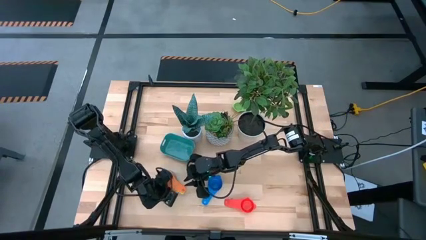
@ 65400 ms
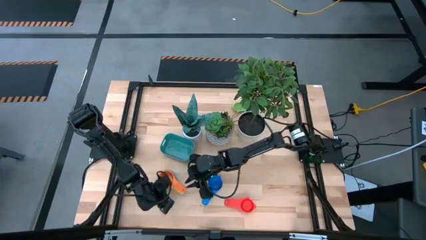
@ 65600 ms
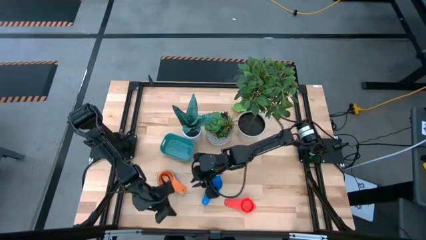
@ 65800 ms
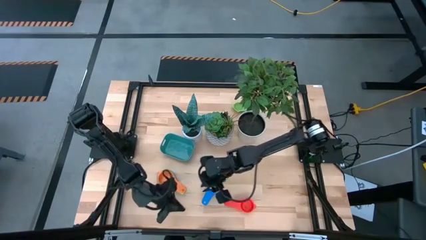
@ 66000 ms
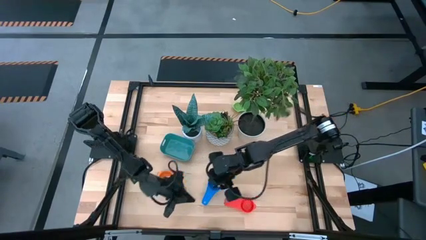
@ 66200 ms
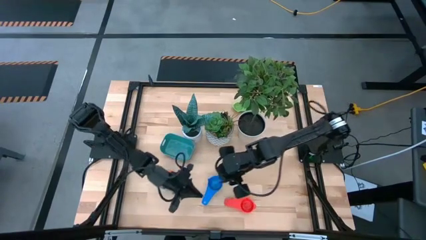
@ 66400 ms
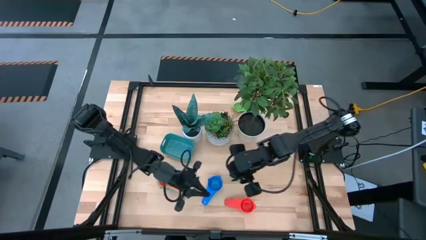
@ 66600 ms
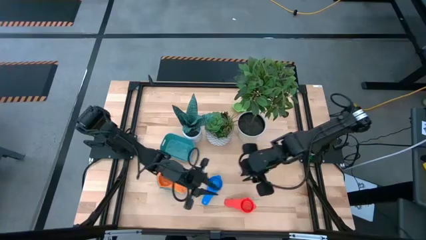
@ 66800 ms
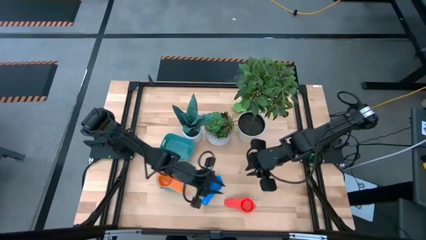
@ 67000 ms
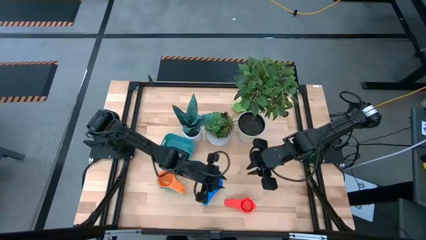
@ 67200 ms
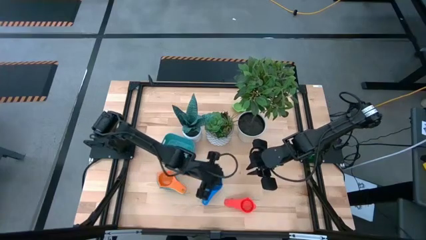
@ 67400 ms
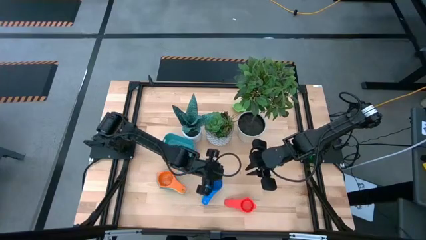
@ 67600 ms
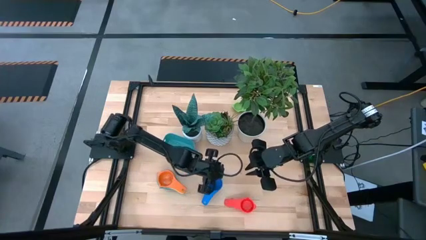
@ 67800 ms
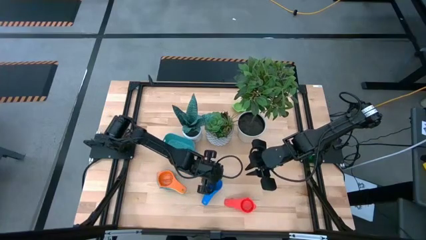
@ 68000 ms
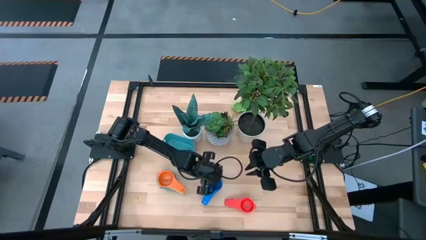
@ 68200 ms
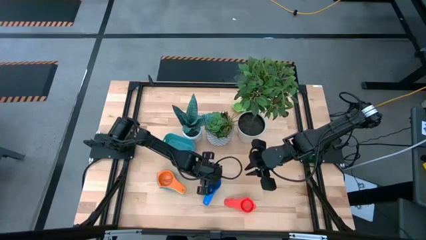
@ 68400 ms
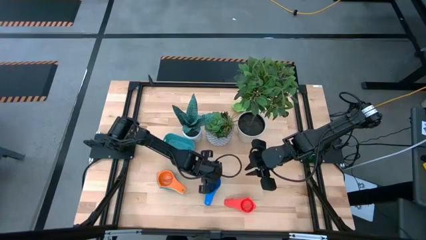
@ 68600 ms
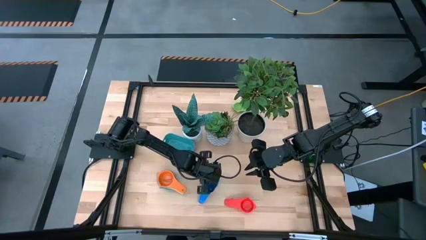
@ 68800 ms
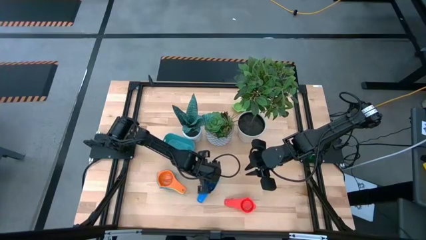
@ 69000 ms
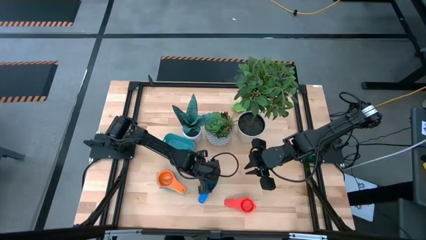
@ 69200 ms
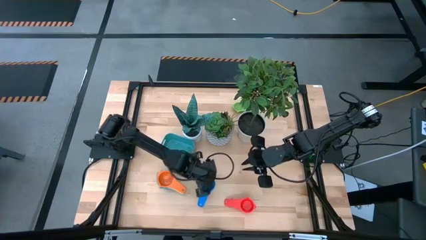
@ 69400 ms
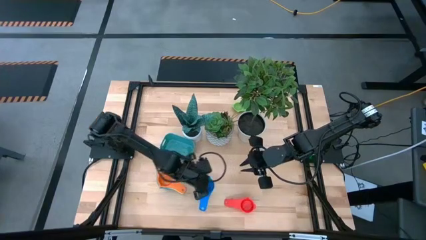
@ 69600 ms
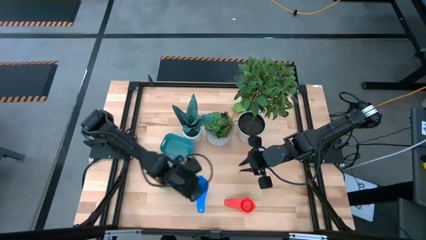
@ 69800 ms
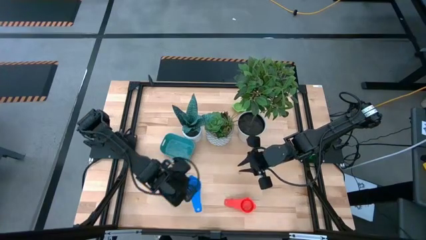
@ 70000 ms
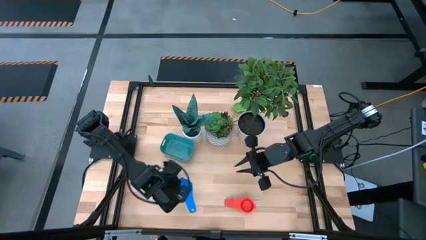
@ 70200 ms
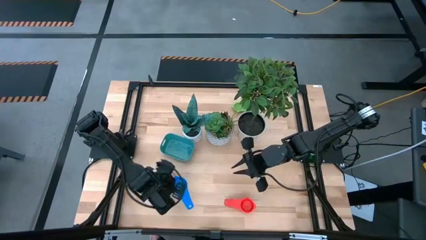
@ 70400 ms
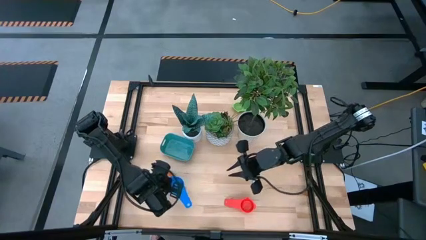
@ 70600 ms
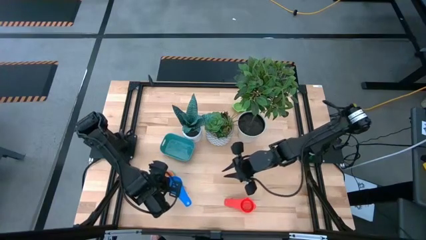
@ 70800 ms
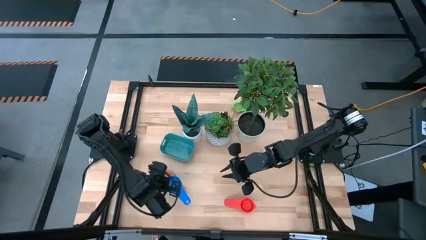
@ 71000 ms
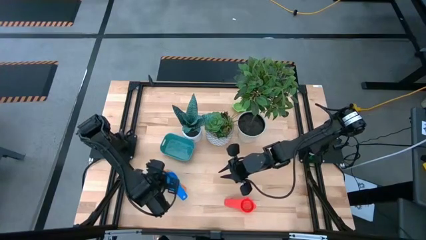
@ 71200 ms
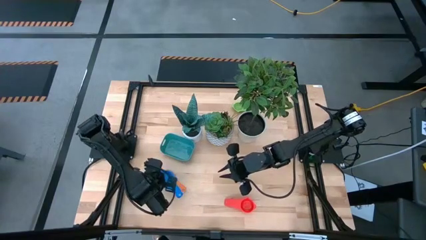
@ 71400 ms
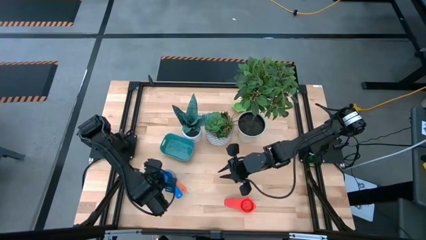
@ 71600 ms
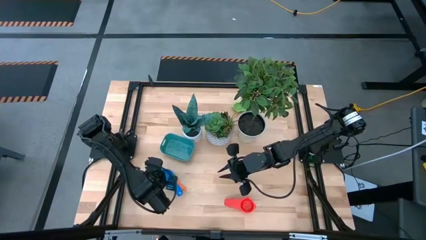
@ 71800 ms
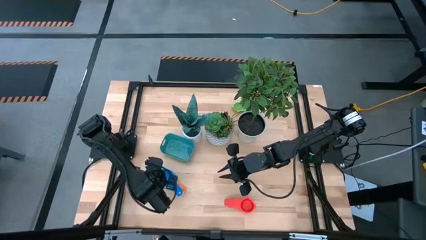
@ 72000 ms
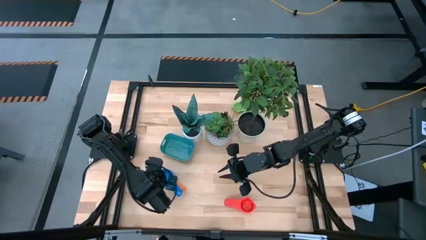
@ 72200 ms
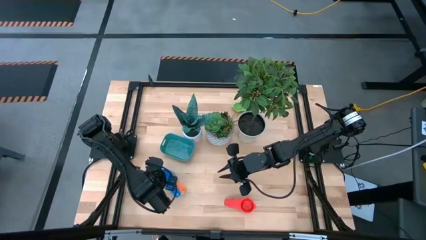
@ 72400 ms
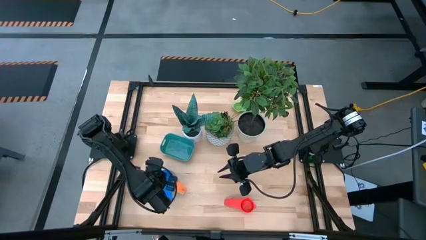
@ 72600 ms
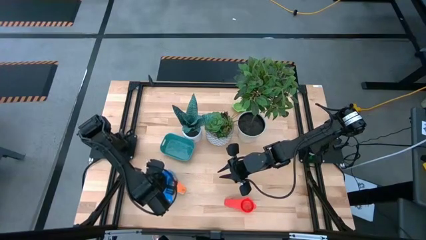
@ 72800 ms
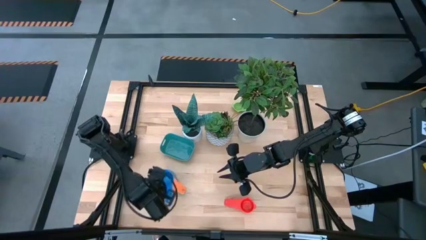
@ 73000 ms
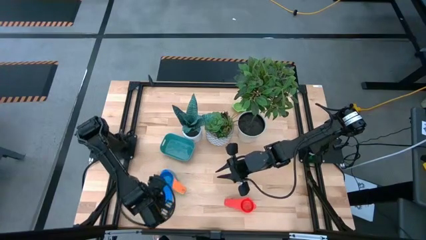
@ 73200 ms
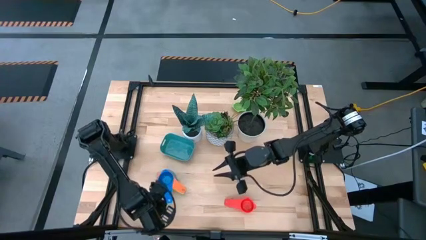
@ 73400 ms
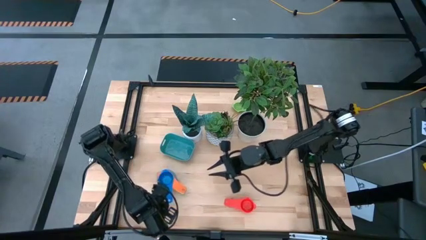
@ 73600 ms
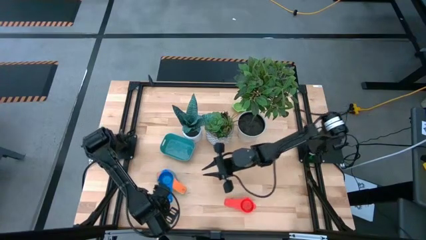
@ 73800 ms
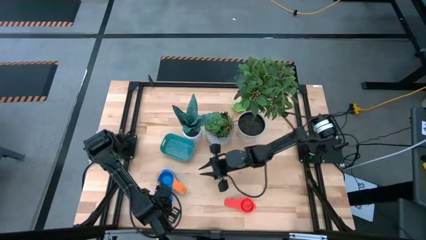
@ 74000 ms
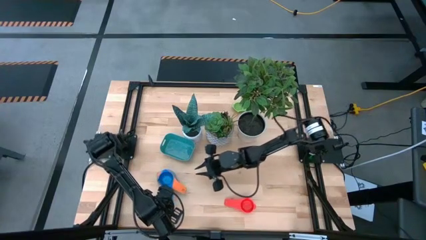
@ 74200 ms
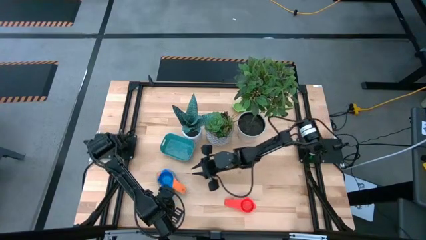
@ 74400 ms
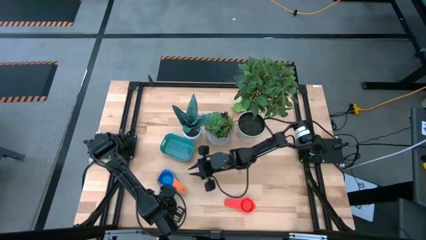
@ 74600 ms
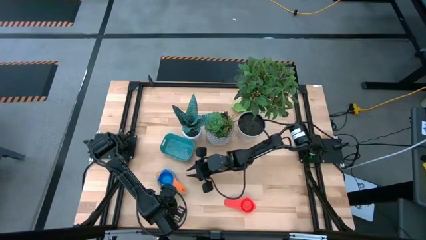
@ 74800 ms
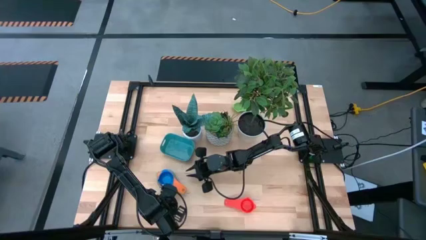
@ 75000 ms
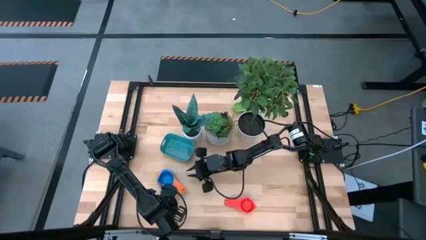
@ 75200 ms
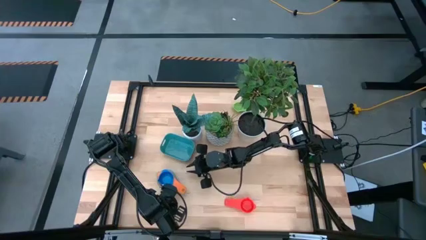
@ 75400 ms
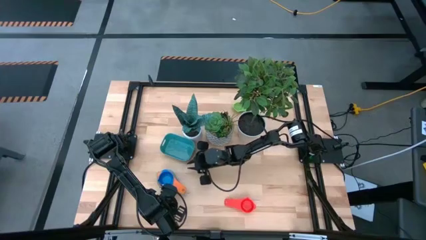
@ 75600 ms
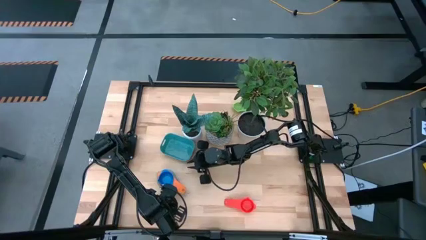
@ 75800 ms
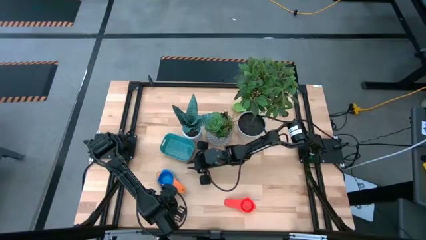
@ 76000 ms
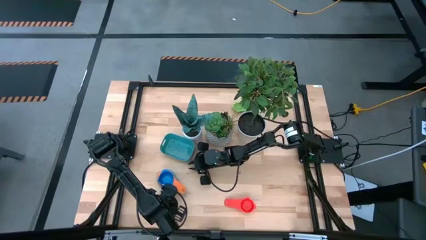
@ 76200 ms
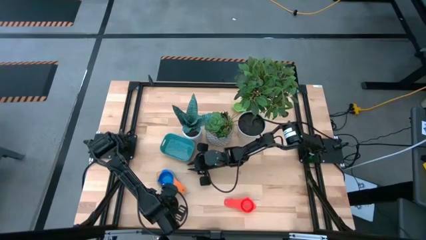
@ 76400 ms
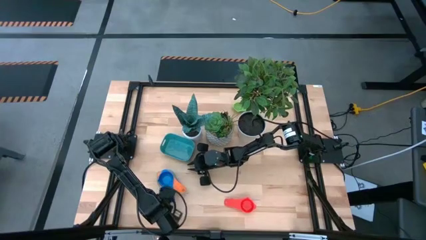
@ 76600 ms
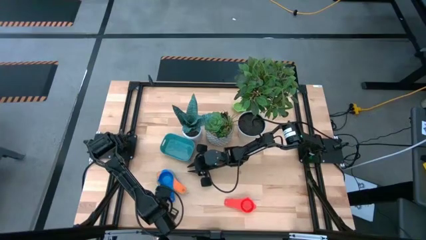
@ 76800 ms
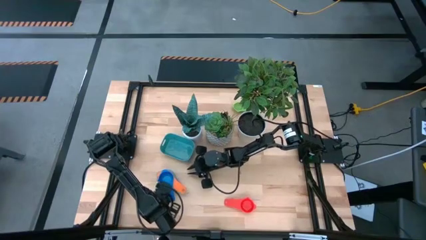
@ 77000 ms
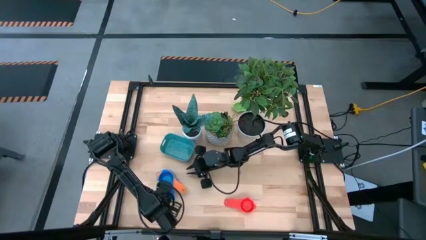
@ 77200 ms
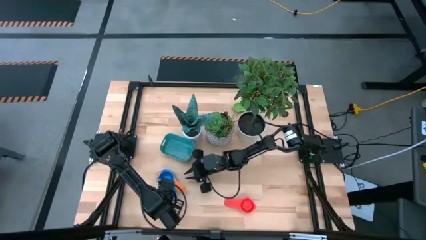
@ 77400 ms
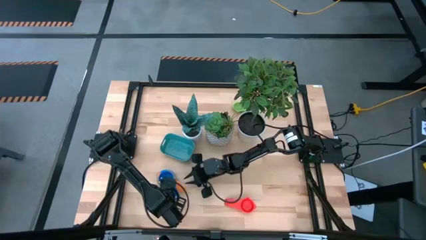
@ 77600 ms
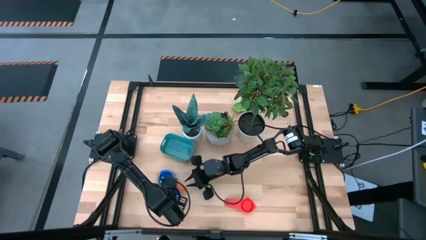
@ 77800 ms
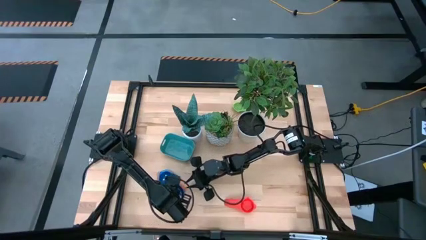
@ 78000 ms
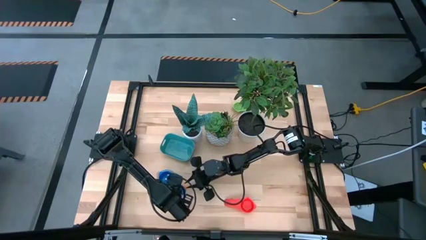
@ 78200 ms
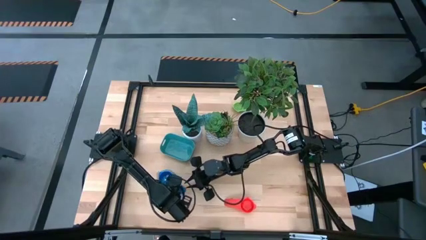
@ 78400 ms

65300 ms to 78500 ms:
Task: Nest measuring cups in basket
Stack the blue measuring cup into the orange measuring cup

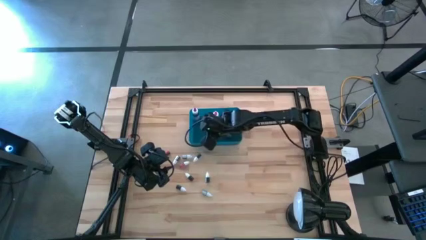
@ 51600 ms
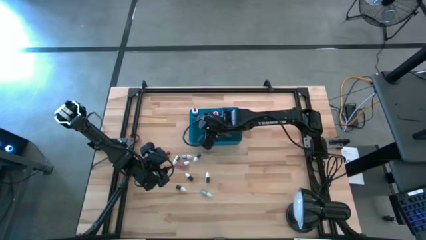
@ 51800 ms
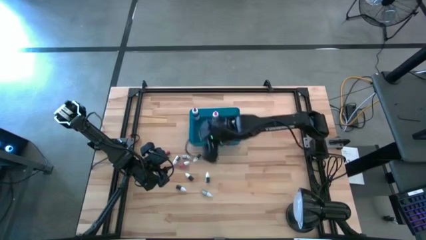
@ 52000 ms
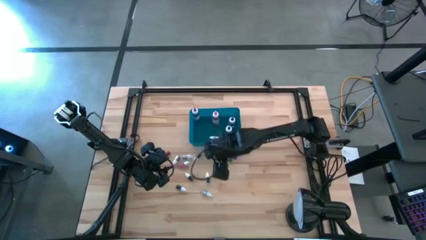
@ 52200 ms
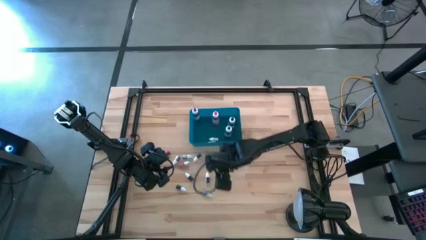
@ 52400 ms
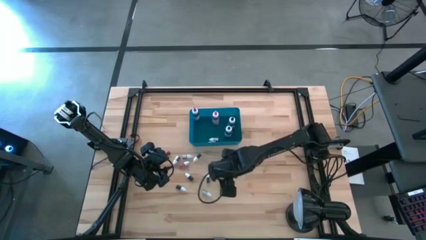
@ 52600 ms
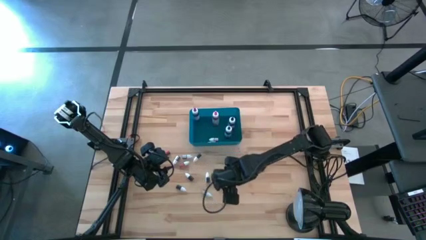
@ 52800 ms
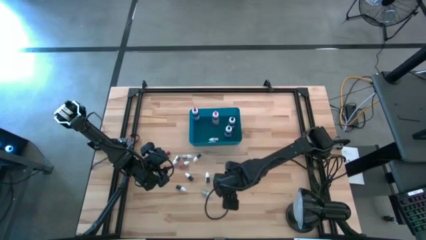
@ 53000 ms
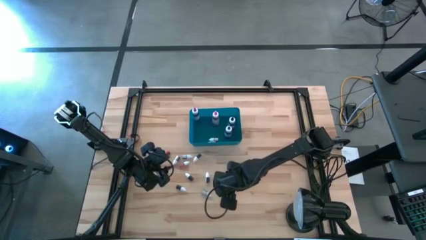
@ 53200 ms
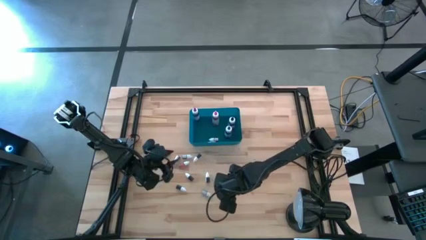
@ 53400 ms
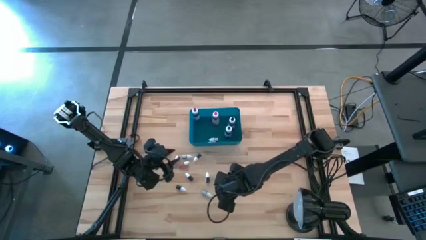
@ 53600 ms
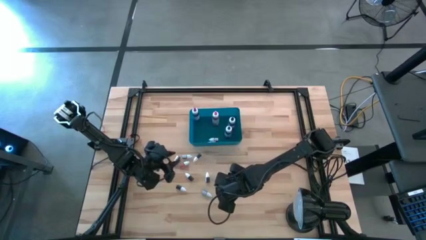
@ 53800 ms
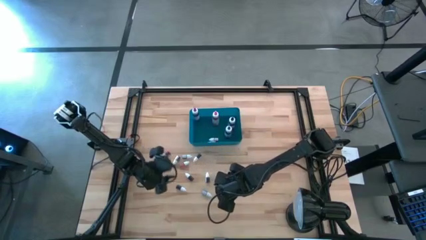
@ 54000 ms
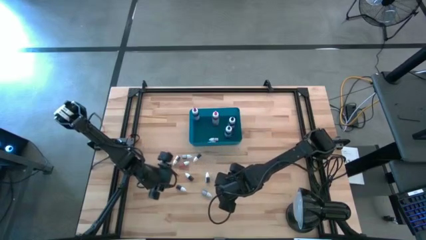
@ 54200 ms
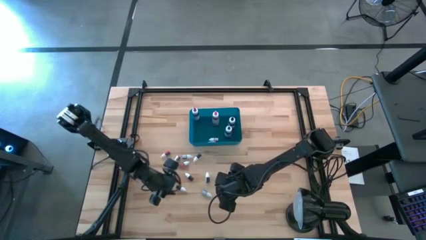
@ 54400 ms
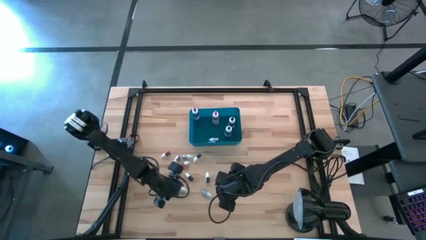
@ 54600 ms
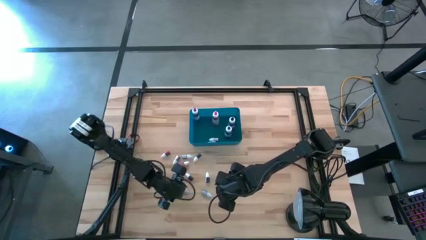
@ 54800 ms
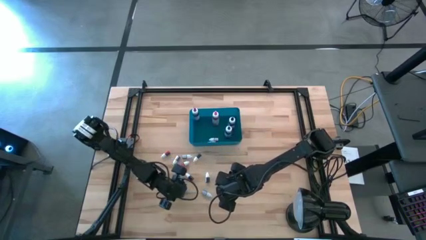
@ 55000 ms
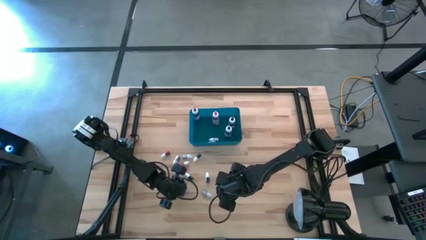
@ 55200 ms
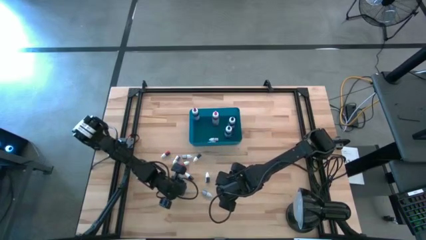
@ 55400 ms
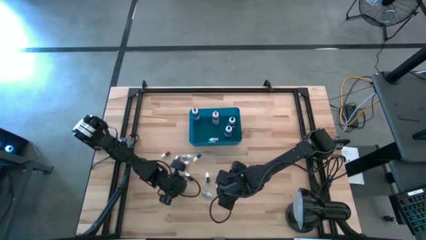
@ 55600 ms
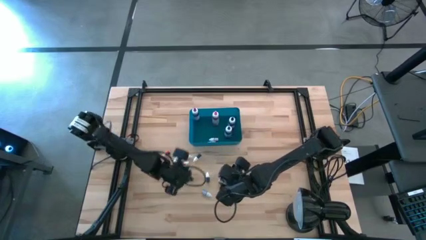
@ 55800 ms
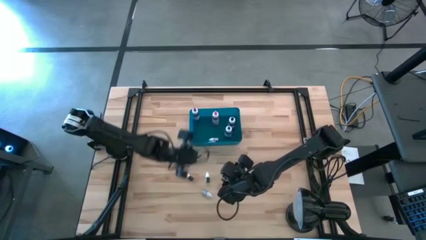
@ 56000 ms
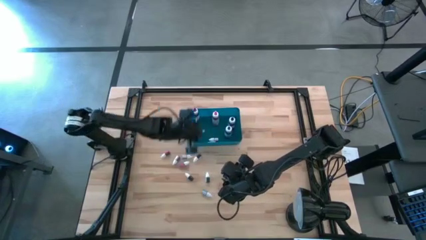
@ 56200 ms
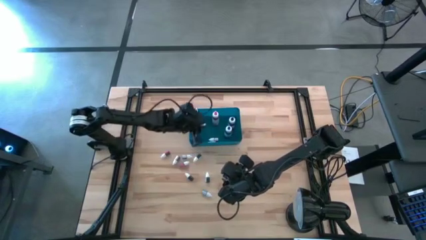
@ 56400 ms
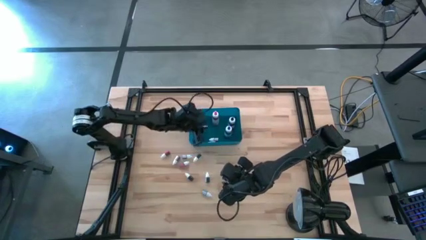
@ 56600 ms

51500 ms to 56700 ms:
Task: Pick & Place food coloring
Put the right small purple food coloring bottle into the bin
